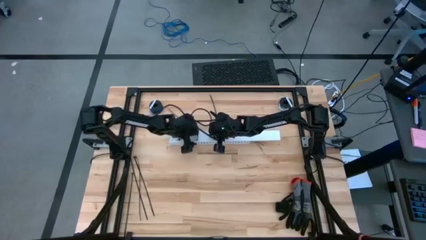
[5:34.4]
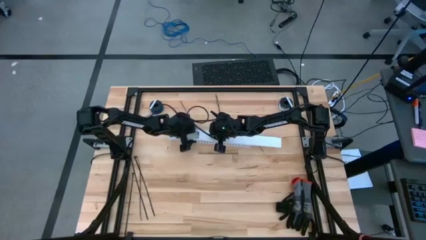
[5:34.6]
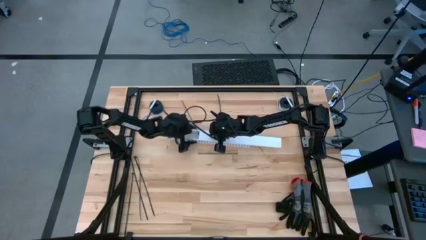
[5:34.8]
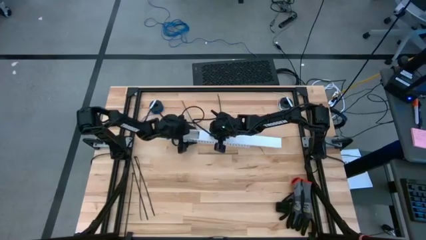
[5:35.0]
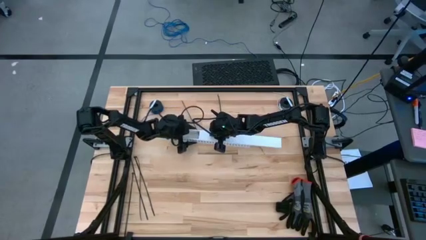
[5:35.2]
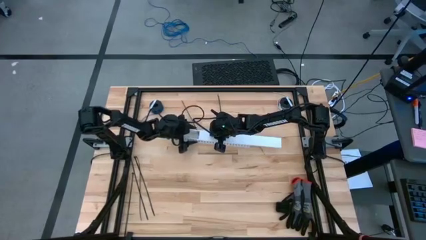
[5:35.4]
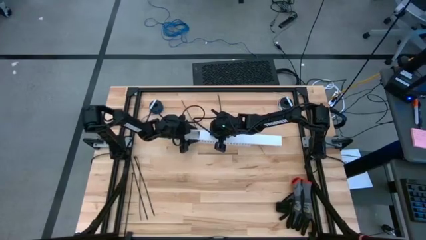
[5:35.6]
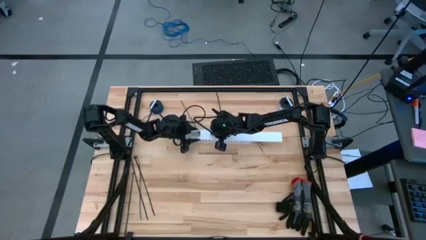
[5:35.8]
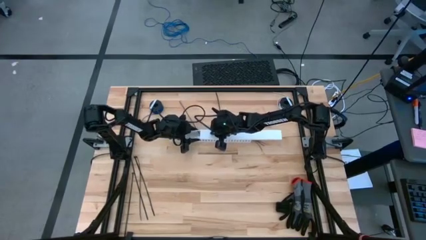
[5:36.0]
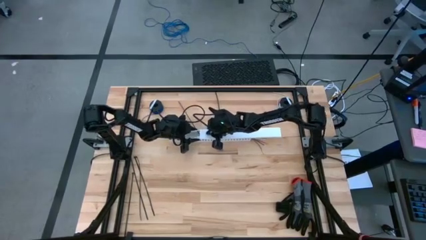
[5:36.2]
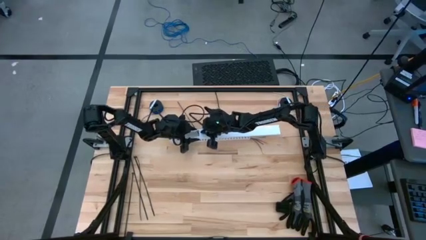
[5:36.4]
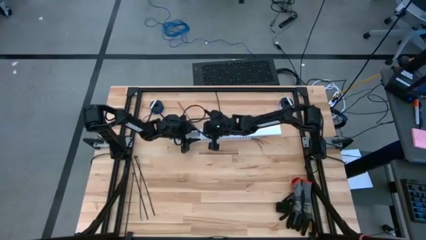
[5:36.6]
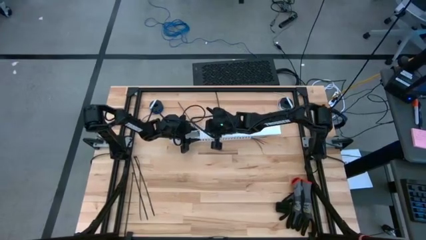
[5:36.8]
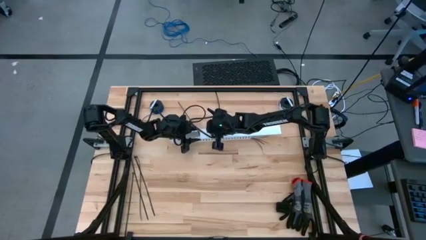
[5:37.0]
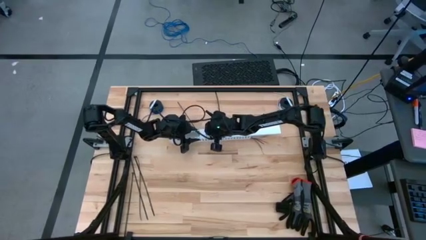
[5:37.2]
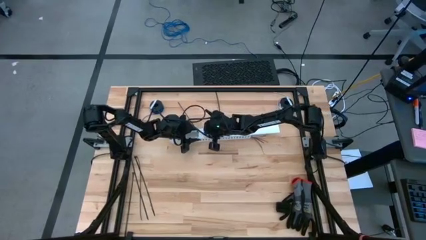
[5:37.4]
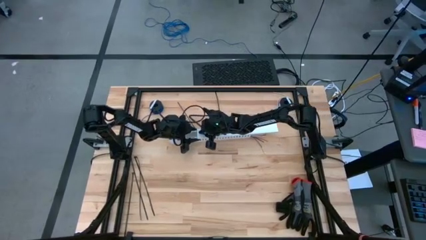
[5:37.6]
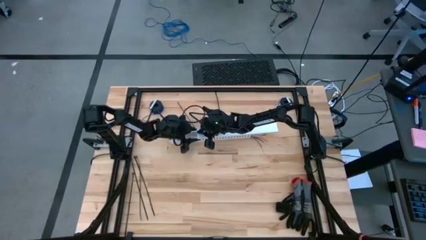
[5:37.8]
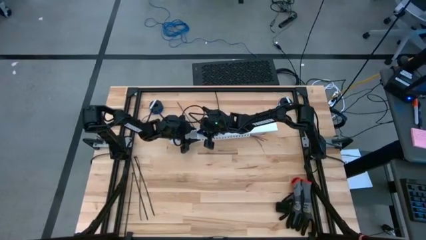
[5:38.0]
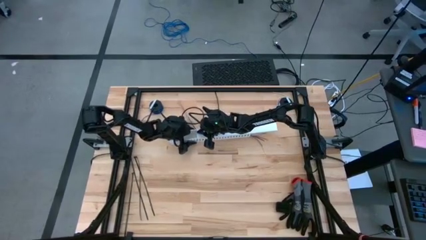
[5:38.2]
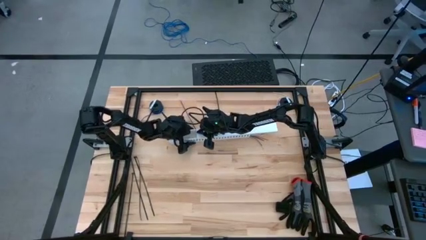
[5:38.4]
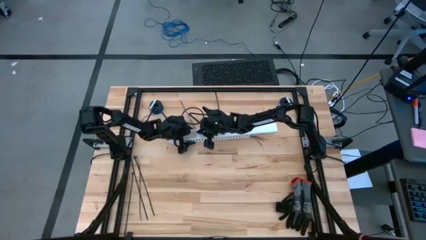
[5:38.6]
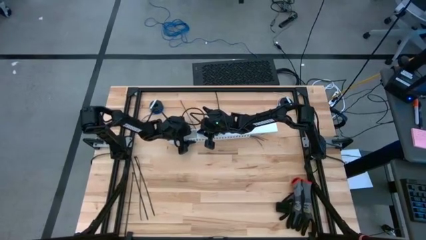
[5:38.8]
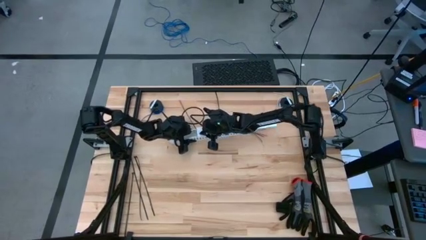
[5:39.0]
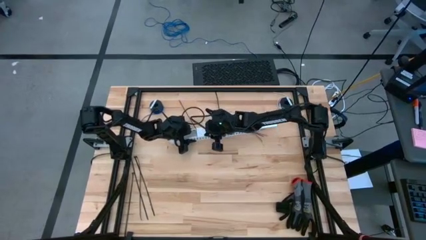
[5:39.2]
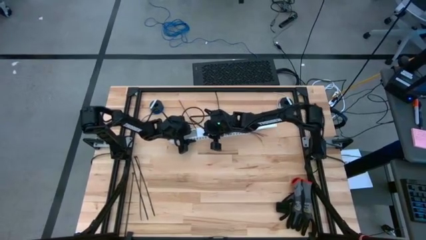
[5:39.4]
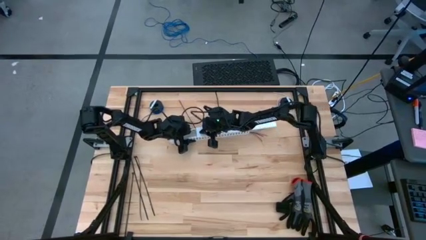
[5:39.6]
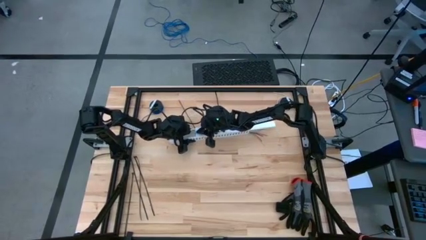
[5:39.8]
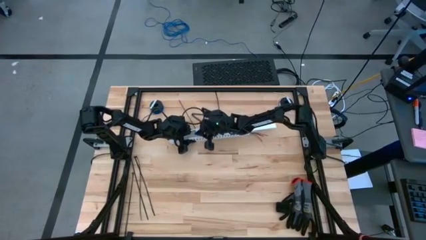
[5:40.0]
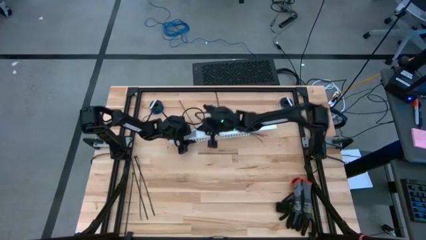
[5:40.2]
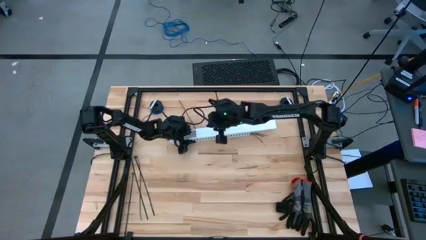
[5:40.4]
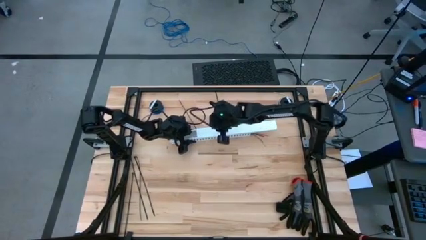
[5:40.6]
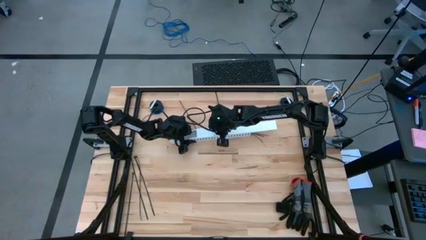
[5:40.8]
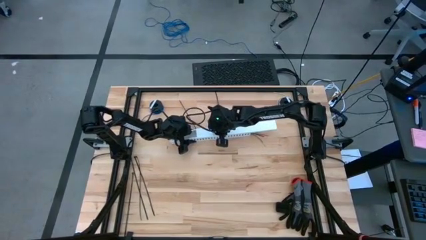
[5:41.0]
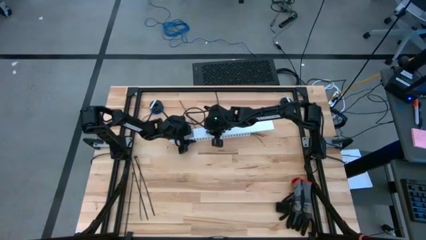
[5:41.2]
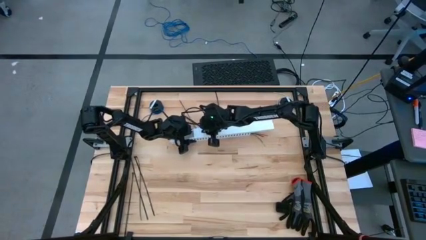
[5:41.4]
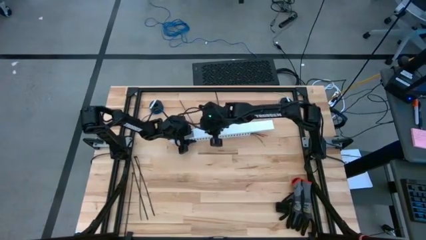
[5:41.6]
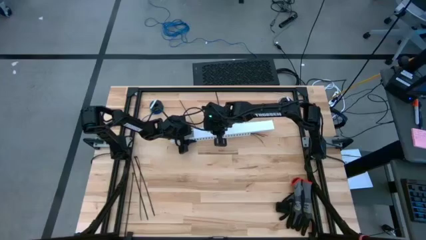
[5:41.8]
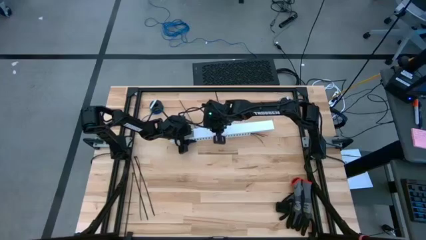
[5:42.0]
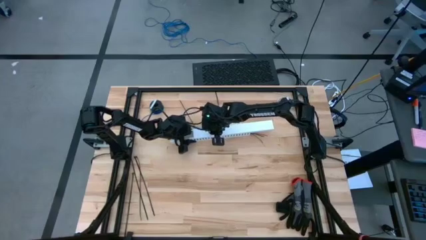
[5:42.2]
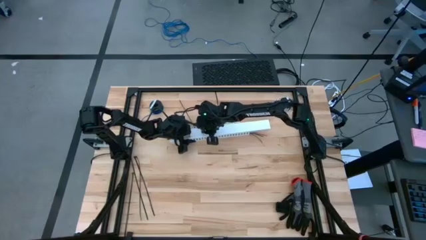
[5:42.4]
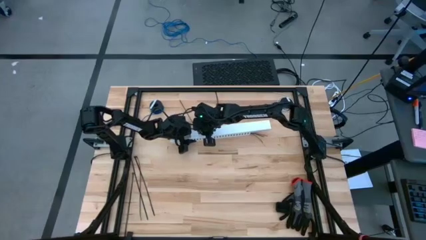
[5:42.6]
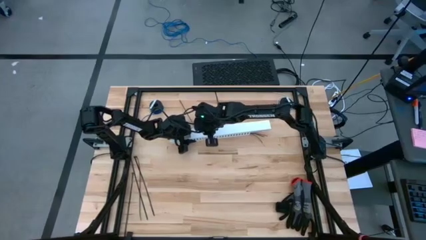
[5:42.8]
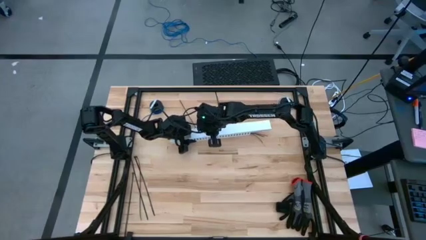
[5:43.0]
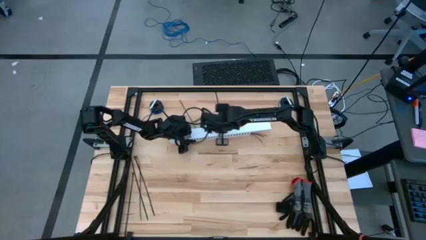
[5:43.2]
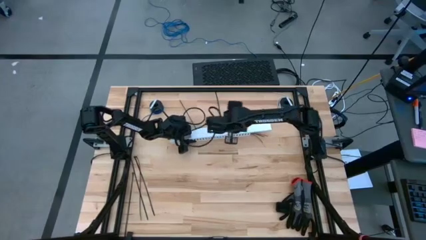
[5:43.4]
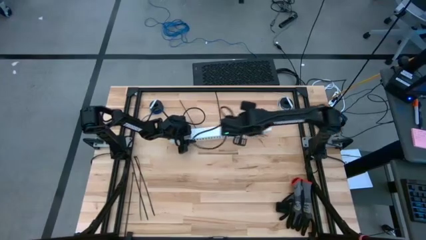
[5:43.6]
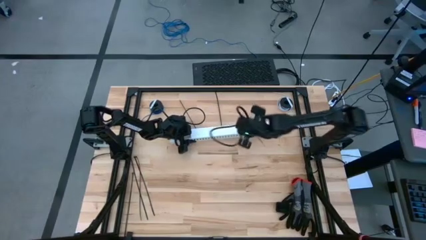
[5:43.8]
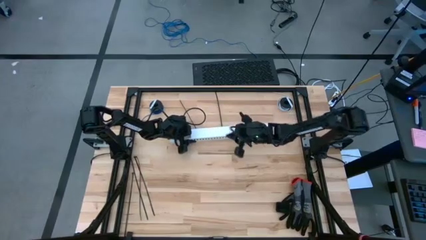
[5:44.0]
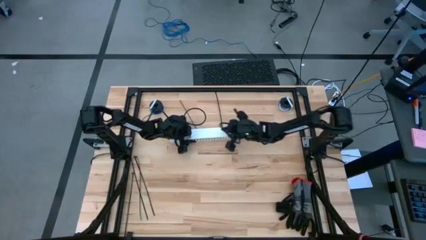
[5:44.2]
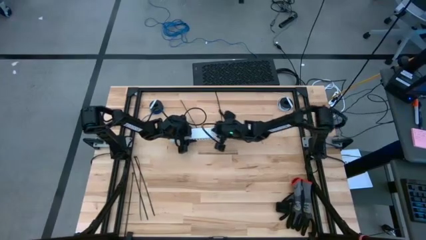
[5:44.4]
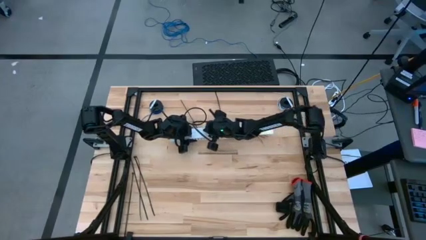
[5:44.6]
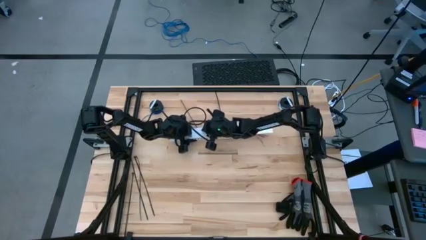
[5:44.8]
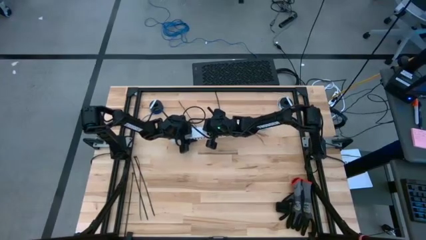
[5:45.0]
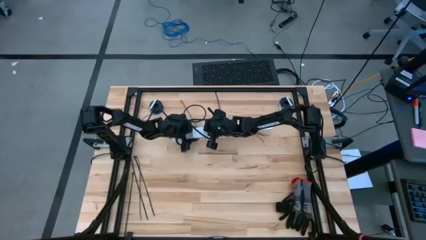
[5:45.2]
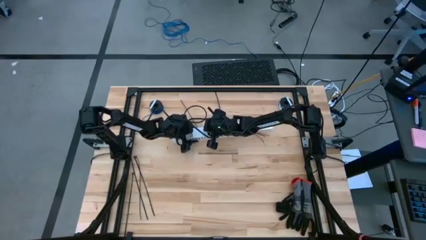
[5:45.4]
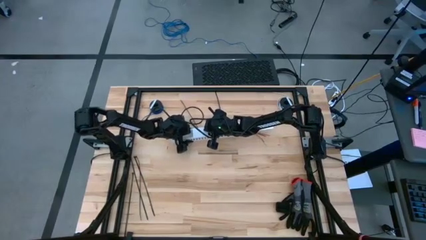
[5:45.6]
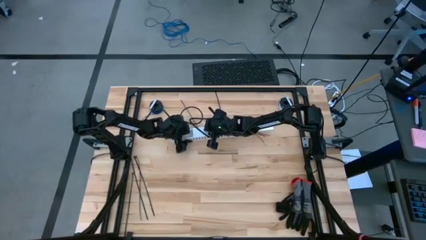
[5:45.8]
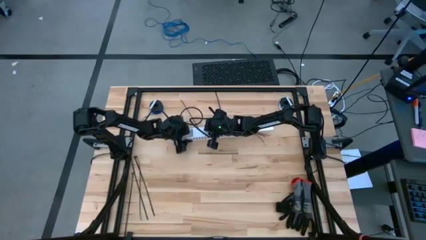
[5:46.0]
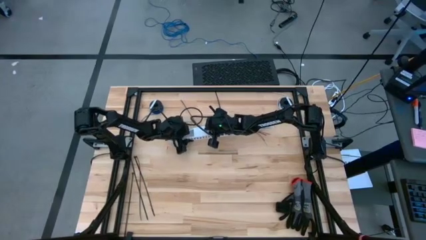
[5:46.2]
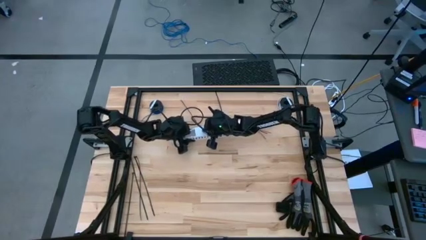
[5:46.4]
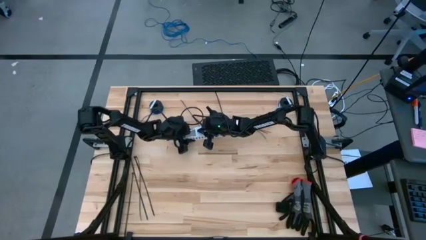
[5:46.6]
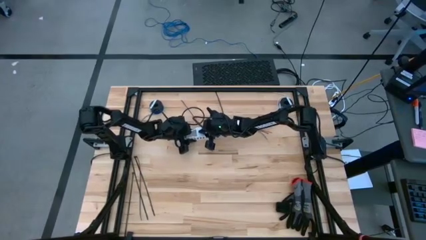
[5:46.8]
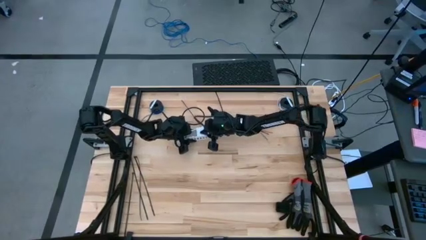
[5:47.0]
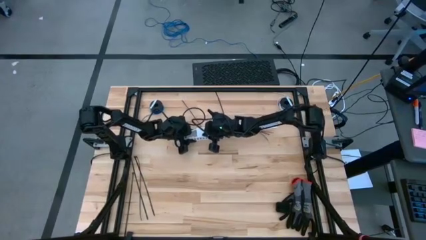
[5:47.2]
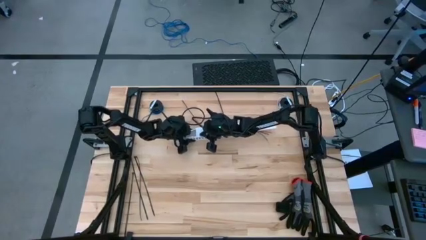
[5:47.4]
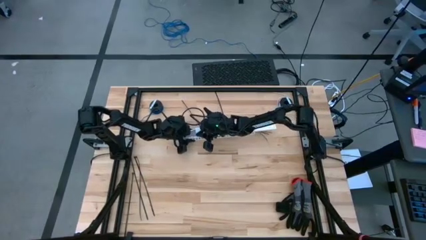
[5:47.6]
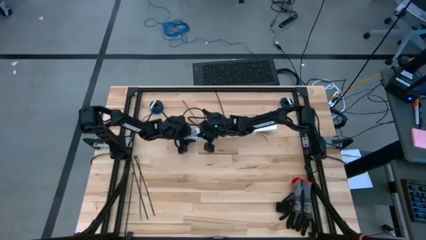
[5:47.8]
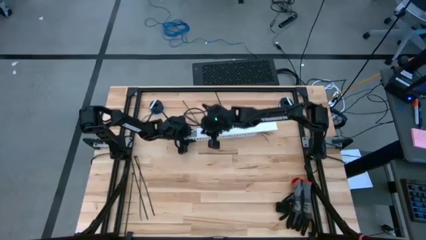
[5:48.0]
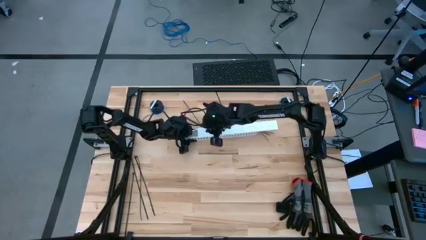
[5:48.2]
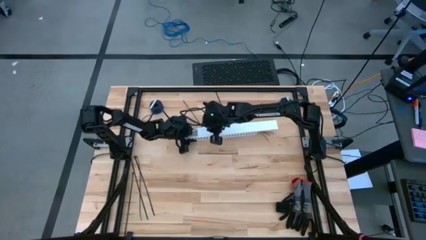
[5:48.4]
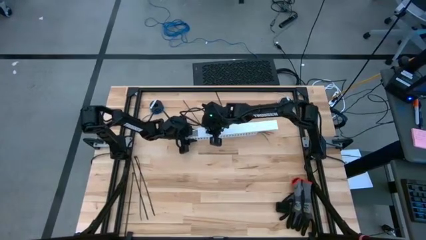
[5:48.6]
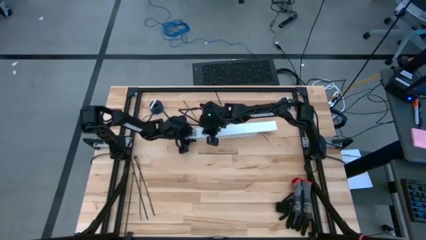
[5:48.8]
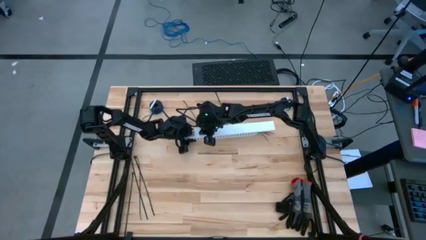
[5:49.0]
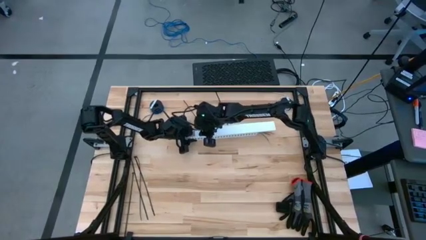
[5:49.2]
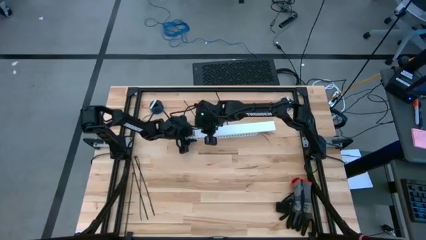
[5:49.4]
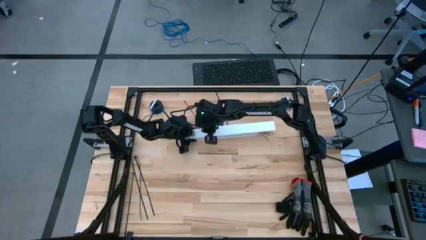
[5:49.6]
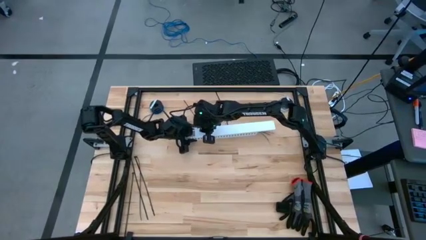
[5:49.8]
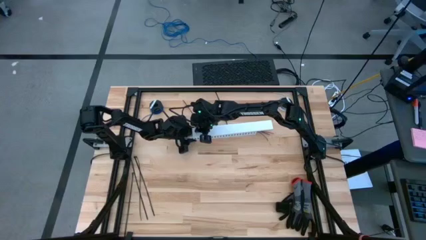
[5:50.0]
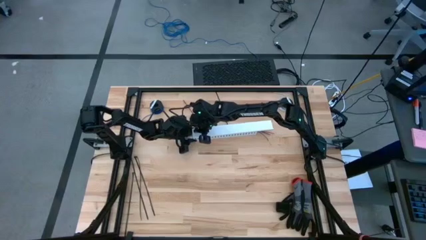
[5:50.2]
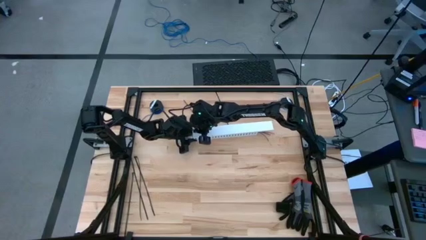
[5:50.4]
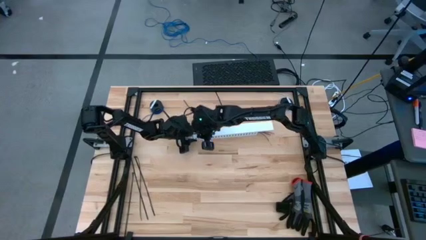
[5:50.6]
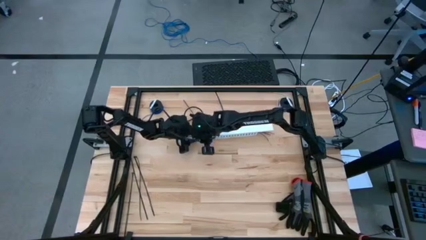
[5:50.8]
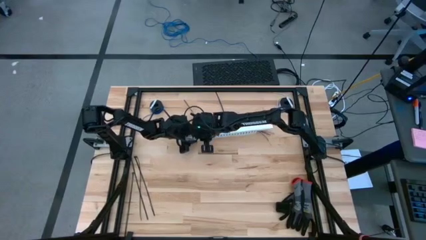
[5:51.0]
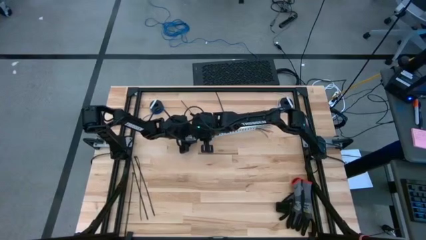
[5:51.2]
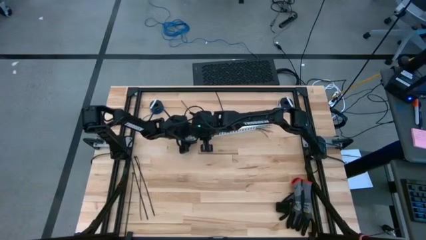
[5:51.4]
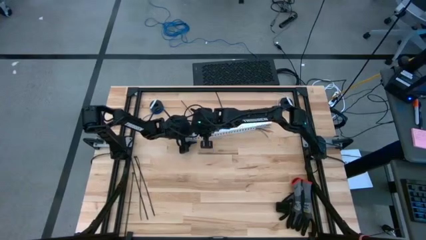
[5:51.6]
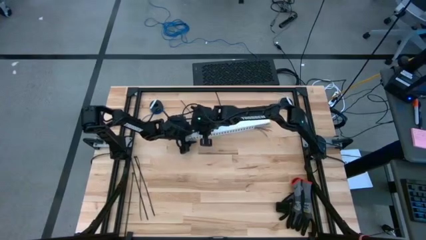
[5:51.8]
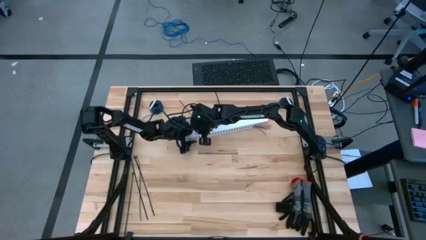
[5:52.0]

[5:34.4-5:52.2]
Task: Ziptie cables
Close the white cable duct
